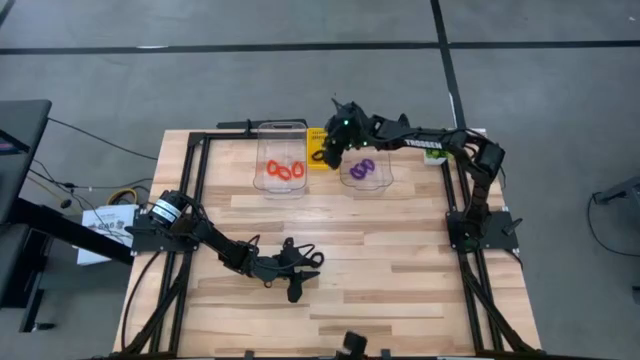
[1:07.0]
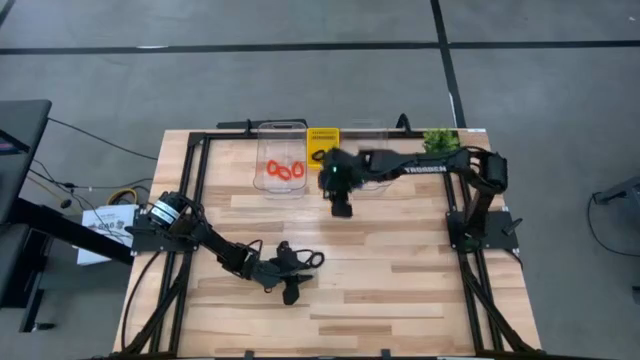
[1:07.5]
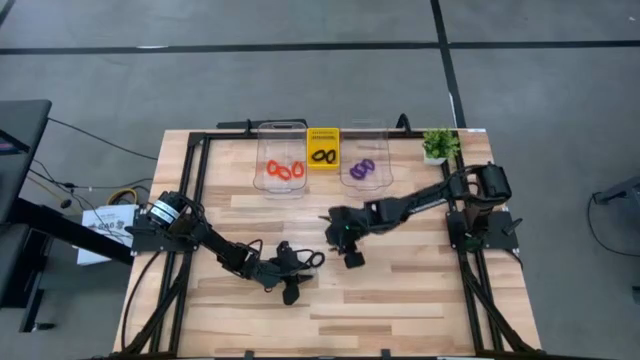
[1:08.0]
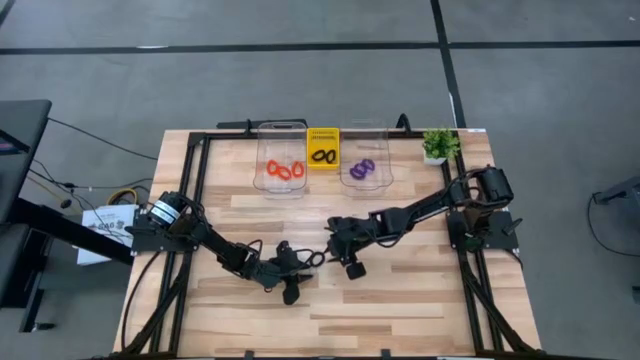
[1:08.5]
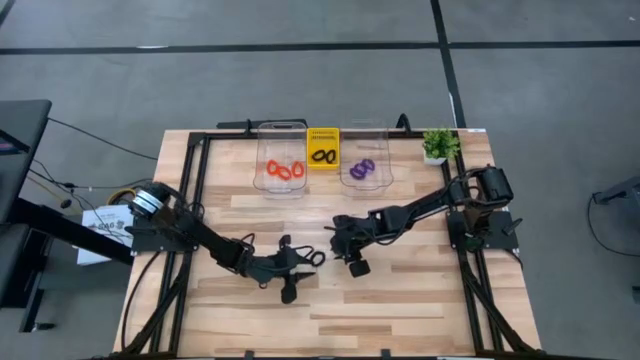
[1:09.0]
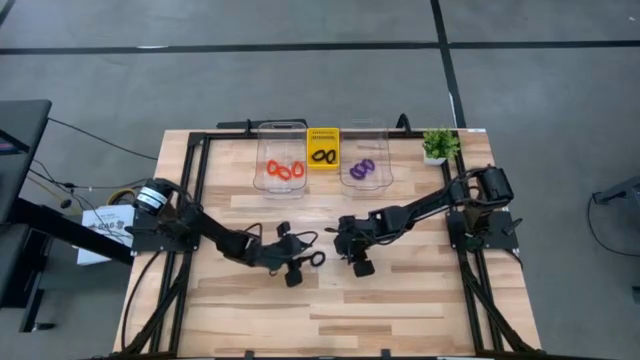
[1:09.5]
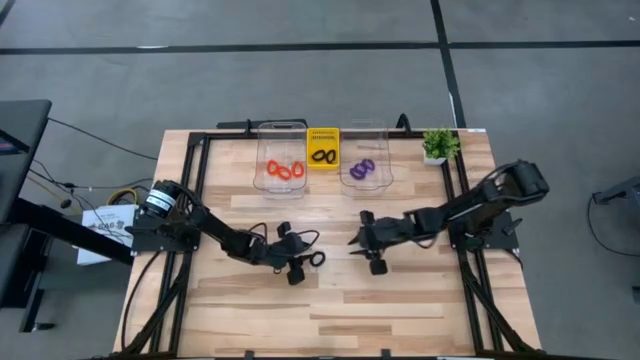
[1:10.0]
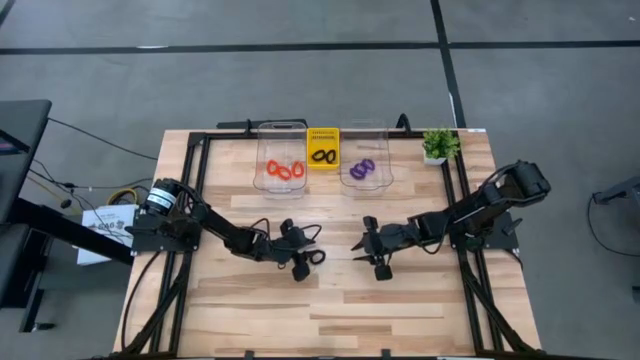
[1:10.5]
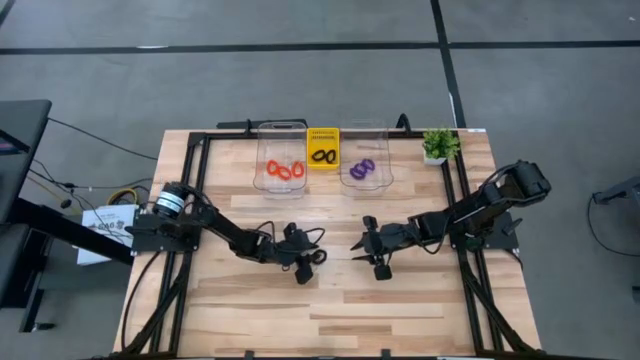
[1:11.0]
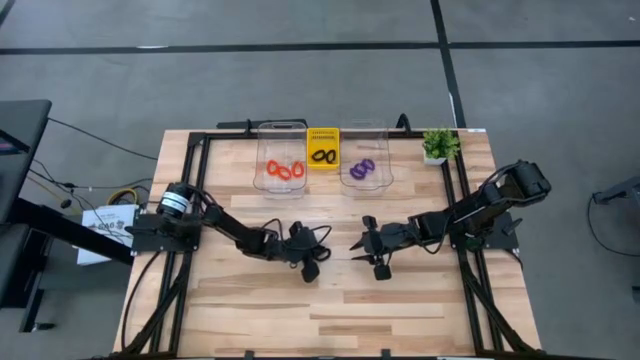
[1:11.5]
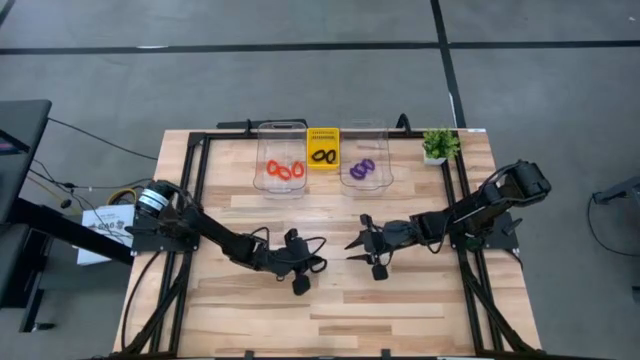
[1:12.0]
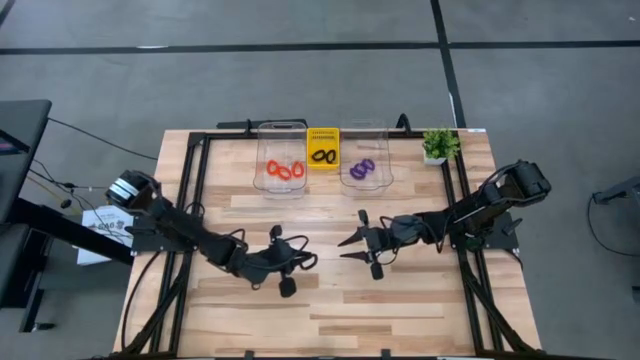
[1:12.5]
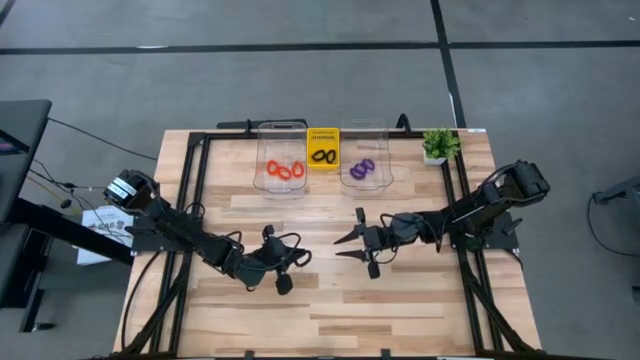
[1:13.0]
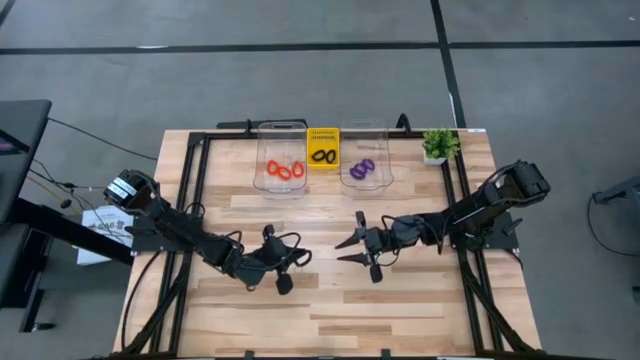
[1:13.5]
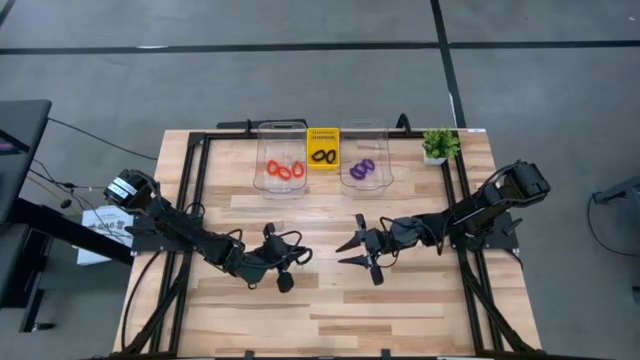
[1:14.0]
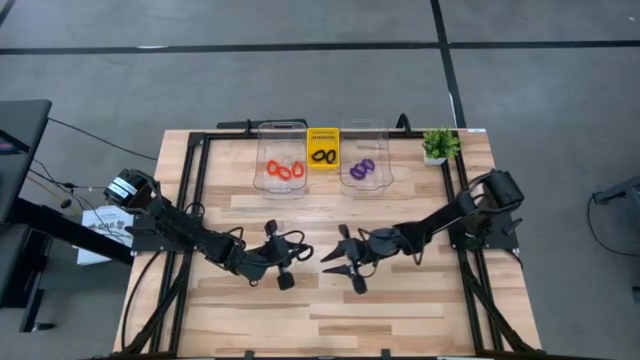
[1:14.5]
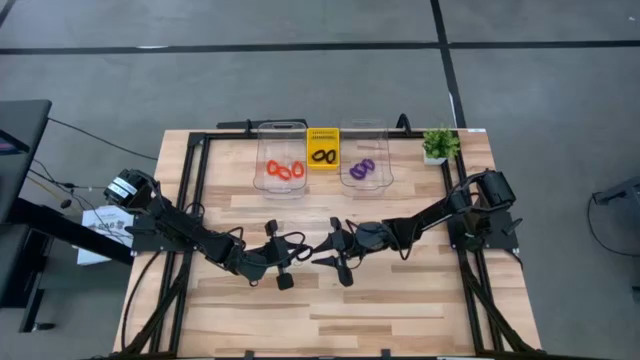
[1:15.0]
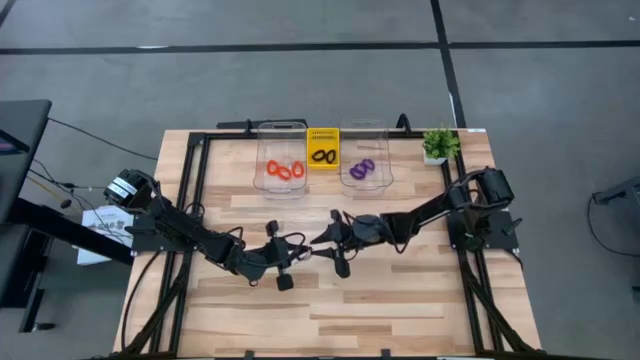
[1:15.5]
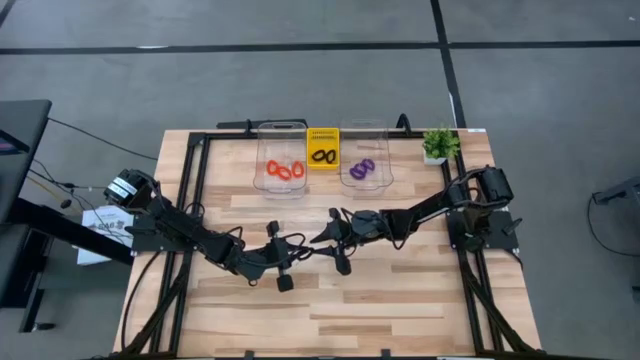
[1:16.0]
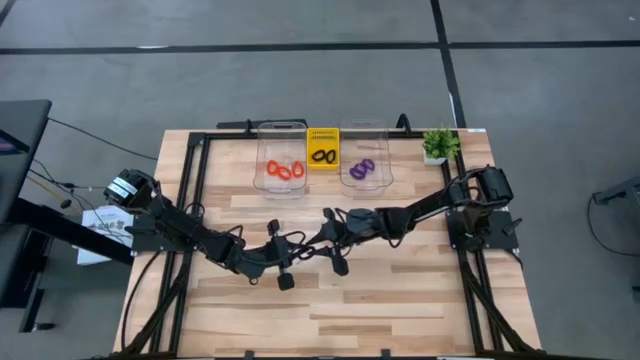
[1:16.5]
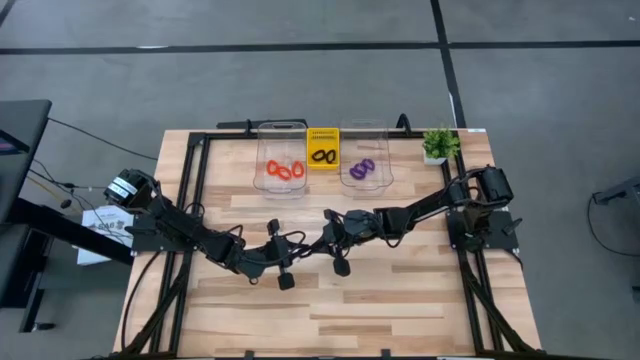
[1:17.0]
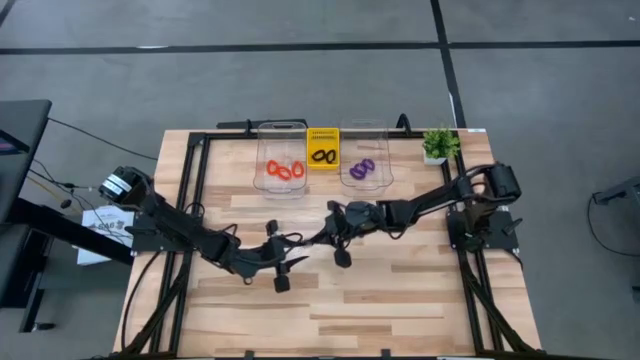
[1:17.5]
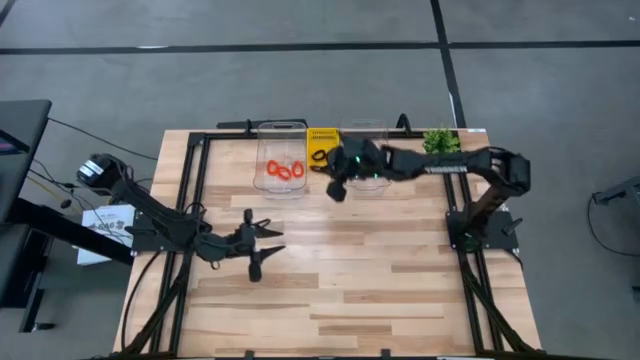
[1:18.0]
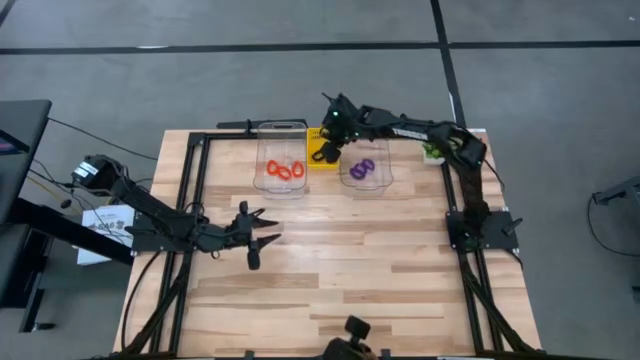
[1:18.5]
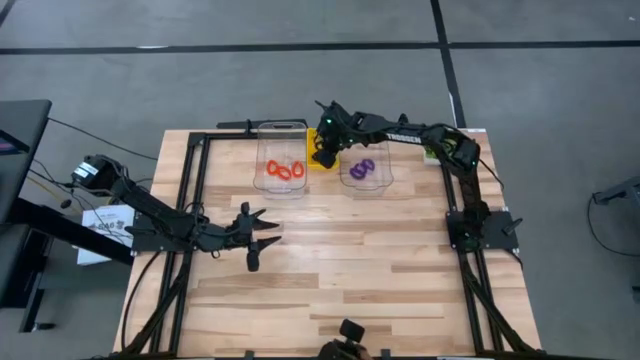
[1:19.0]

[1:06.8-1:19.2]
Task: Sort spring keychains
Put the black spring keychain into the yellow bin

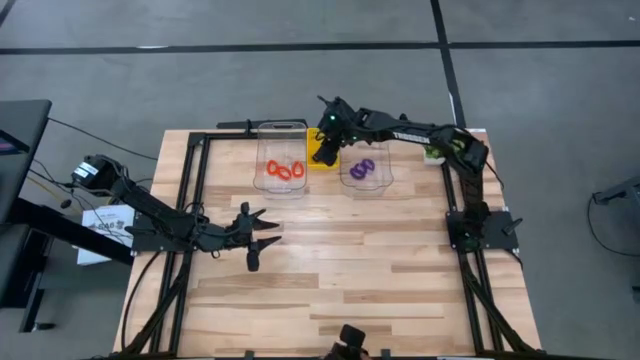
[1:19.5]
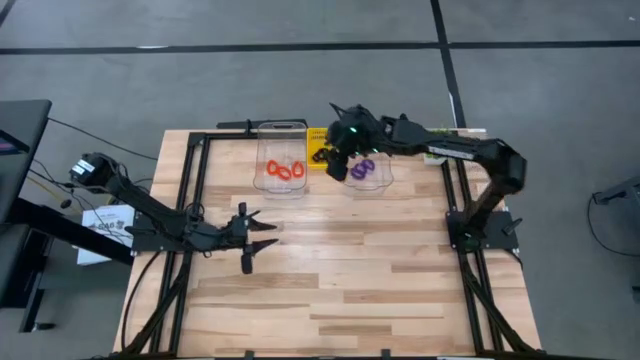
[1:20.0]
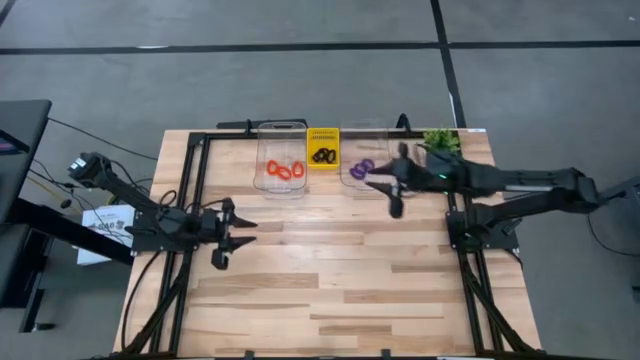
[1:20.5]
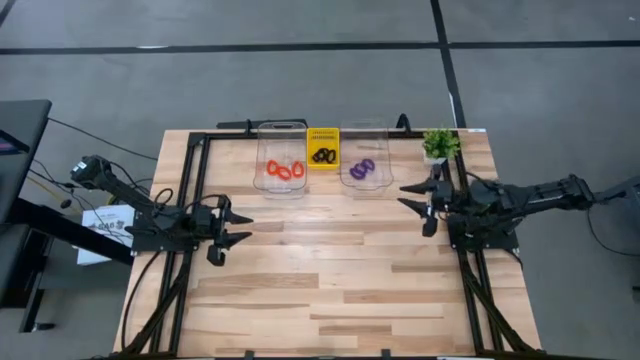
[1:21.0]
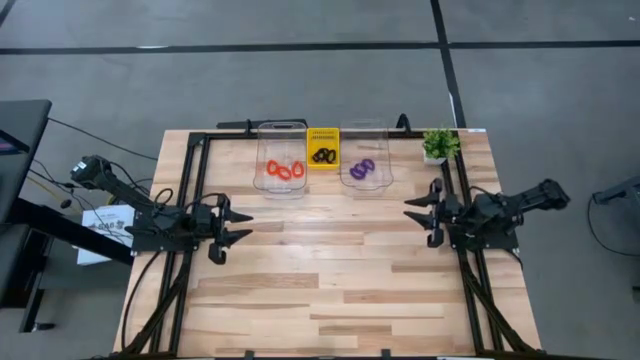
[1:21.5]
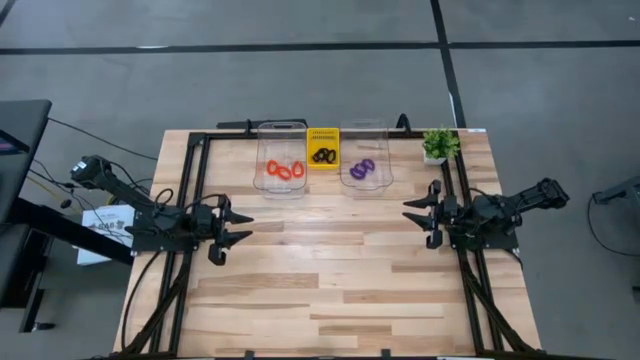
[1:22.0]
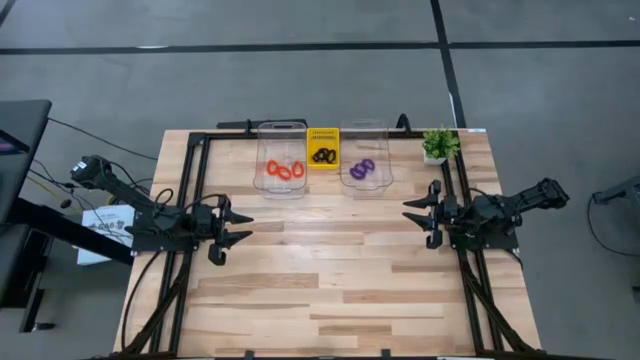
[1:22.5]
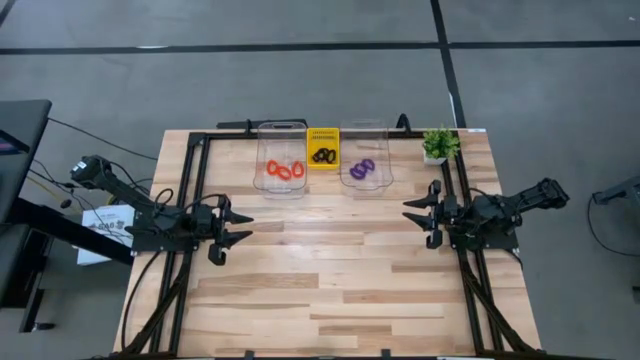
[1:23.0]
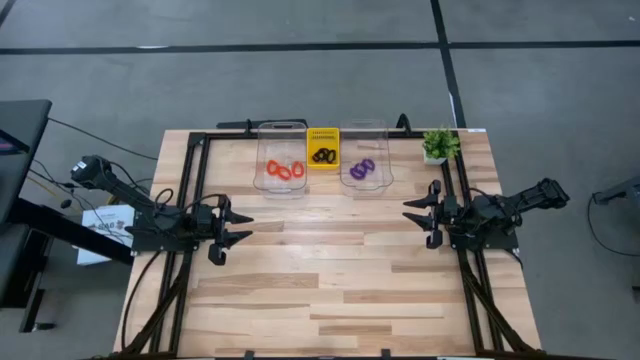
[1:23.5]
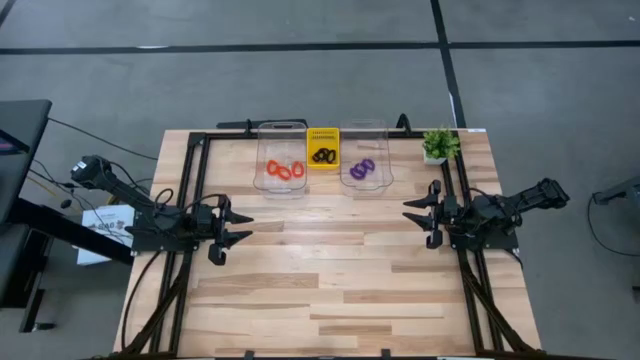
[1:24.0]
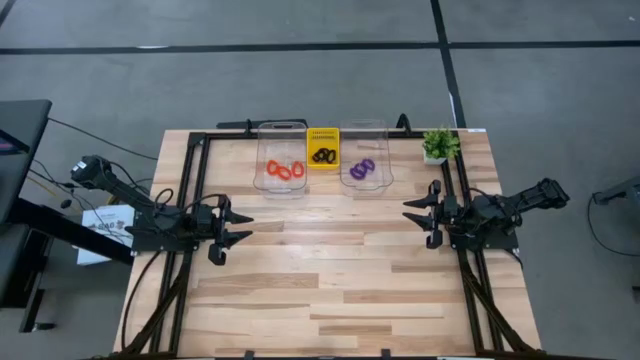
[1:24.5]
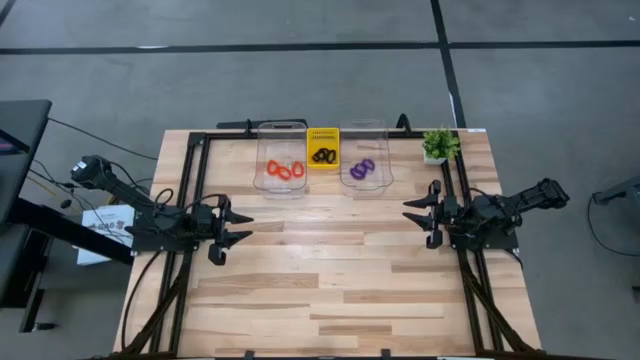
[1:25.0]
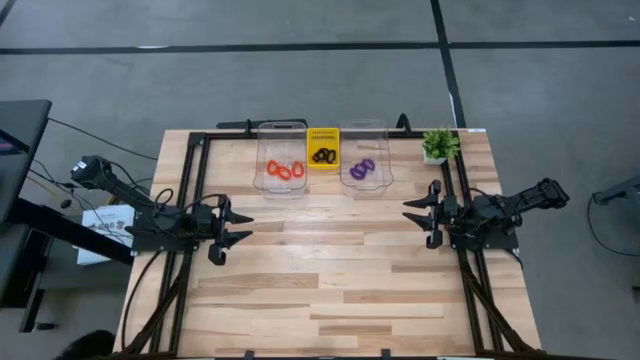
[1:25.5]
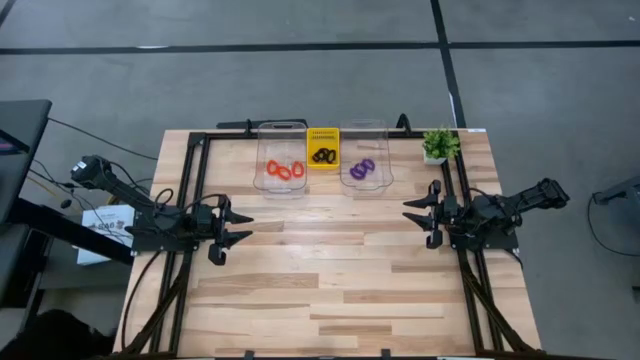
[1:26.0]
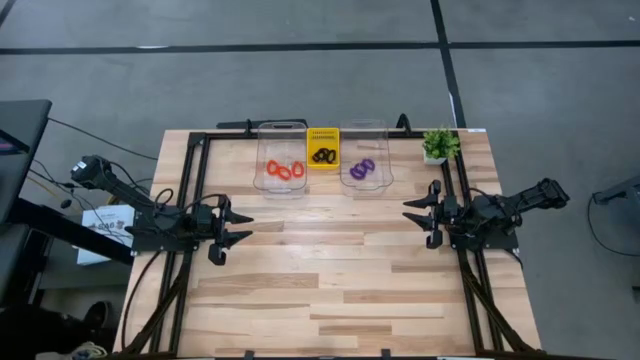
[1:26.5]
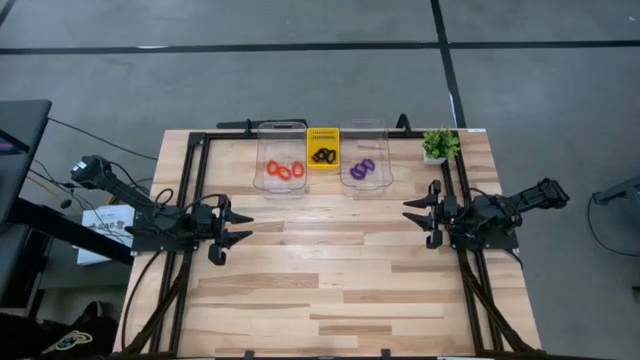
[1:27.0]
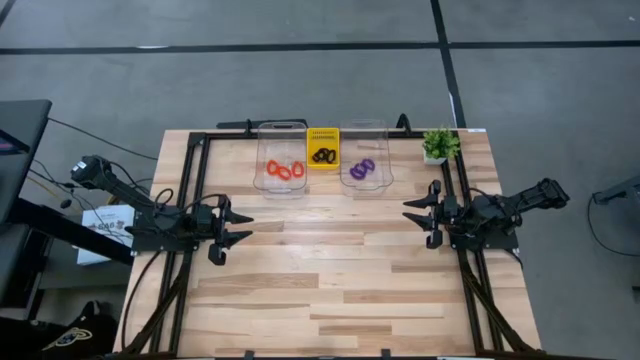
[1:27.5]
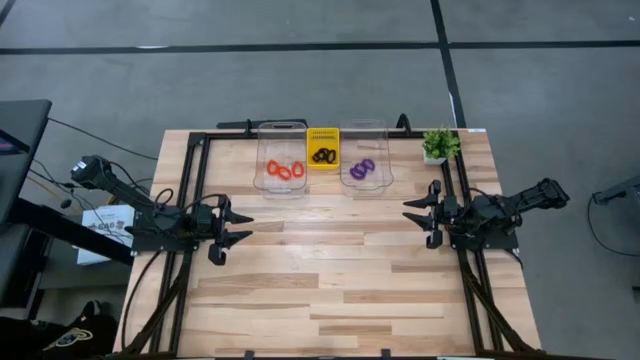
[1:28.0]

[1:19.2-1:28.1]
Return to Home Position
